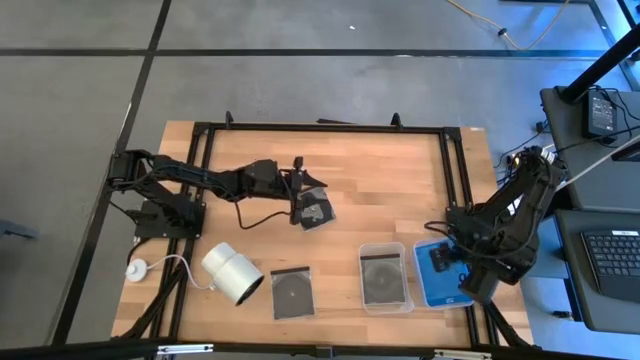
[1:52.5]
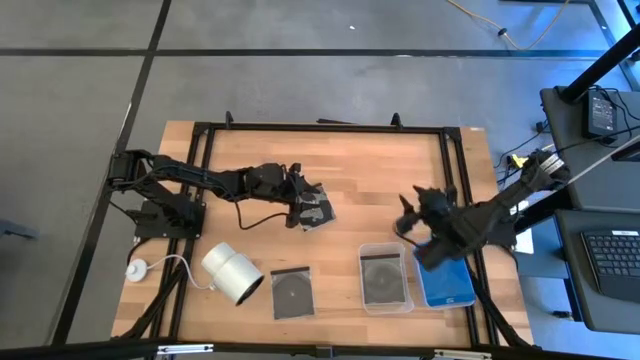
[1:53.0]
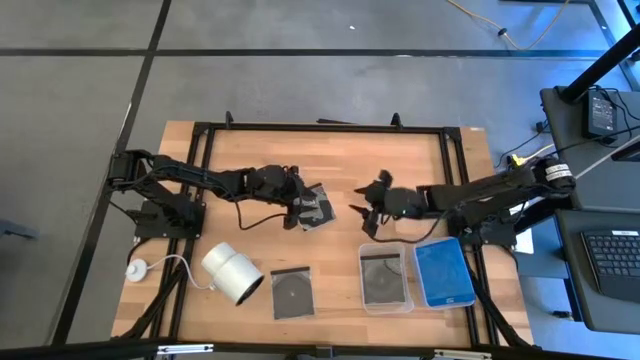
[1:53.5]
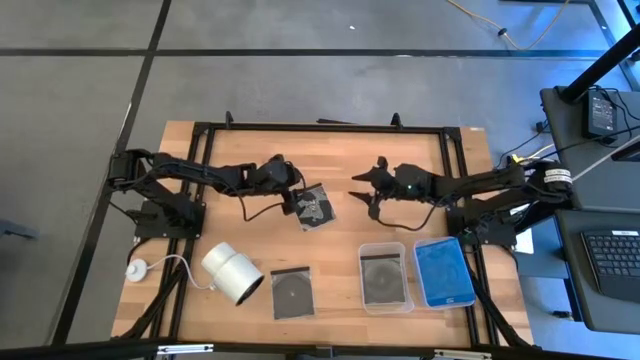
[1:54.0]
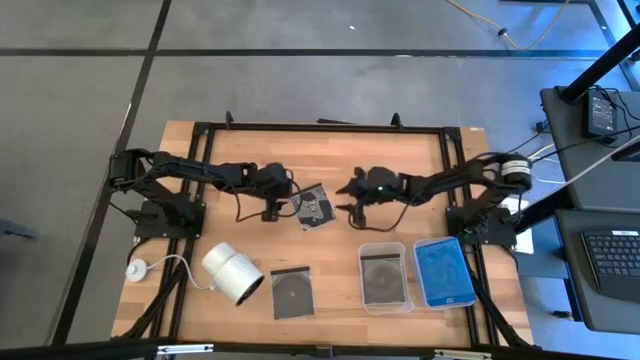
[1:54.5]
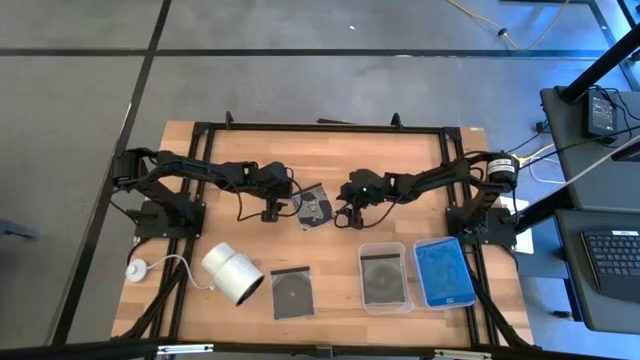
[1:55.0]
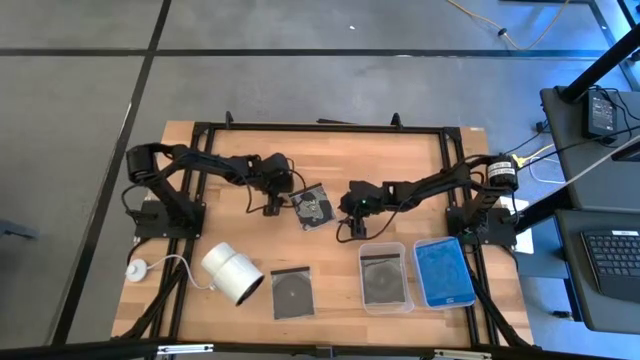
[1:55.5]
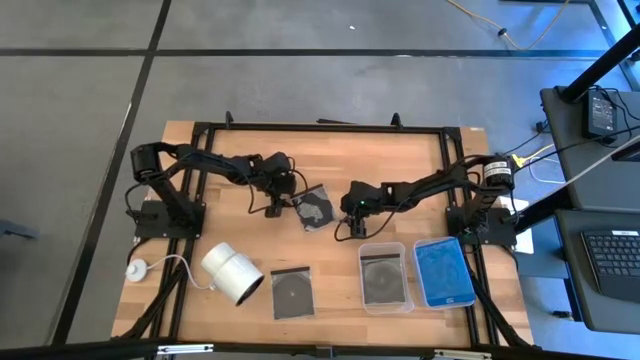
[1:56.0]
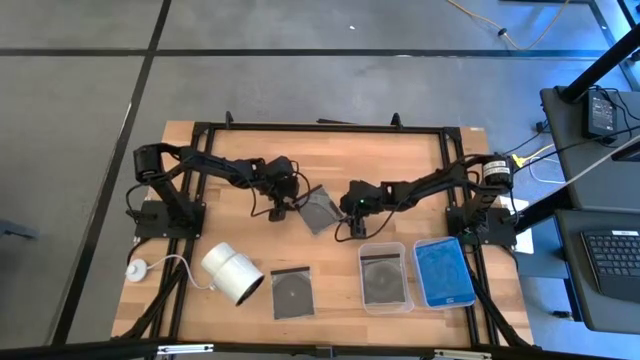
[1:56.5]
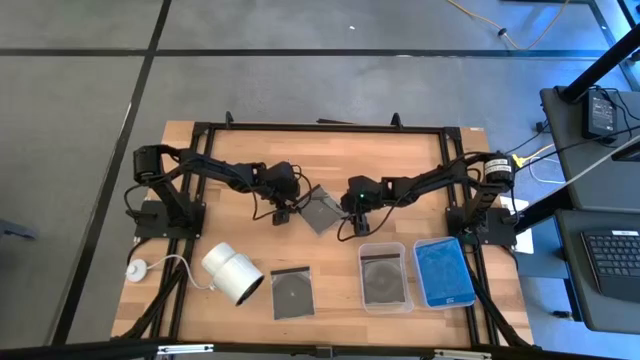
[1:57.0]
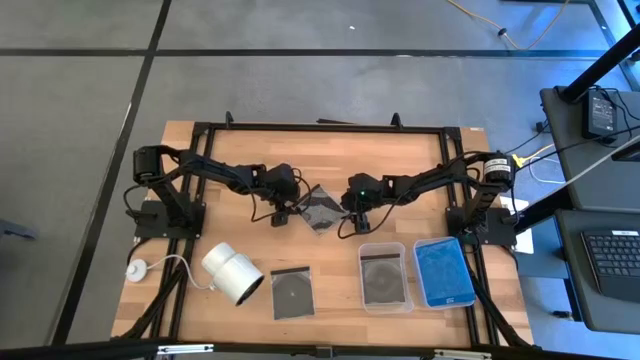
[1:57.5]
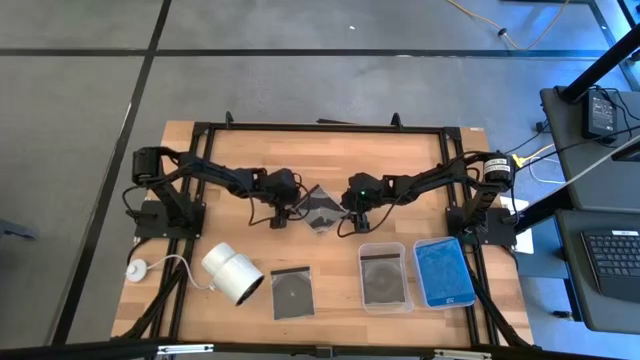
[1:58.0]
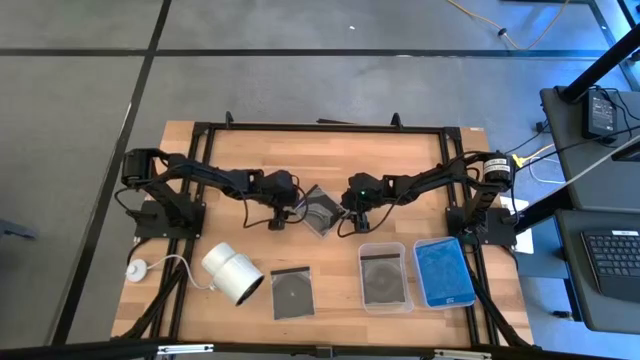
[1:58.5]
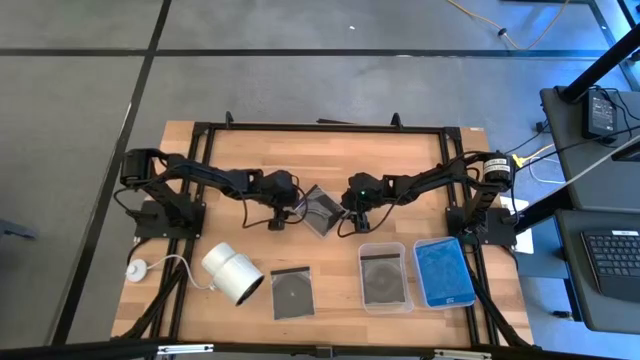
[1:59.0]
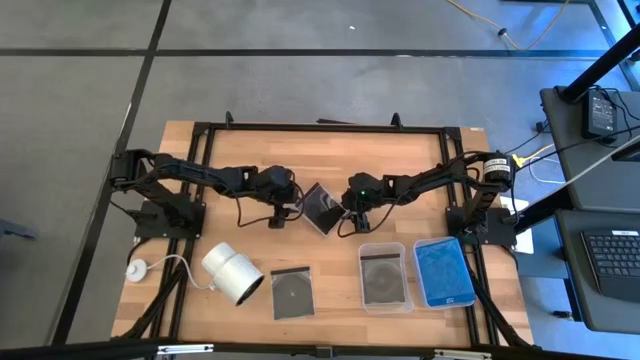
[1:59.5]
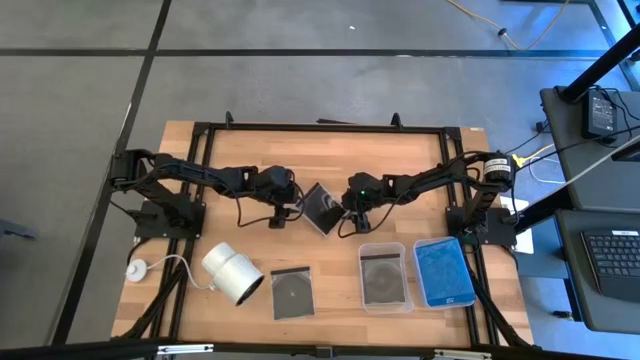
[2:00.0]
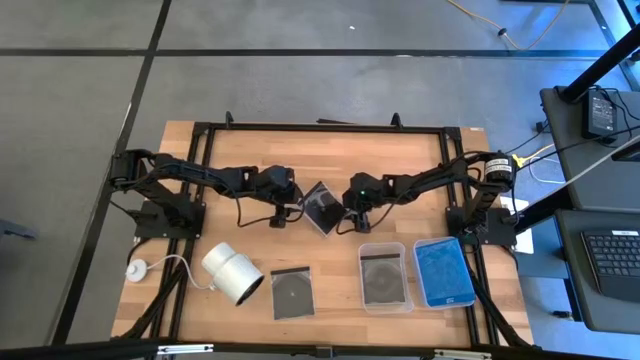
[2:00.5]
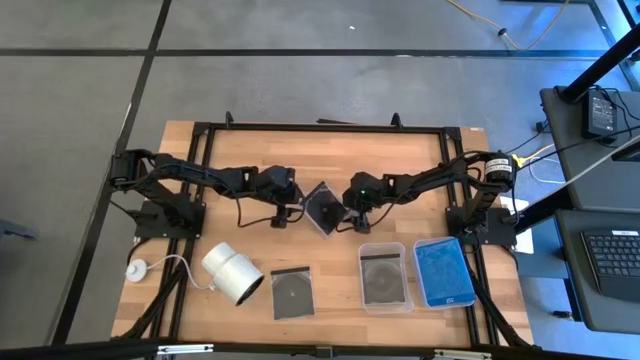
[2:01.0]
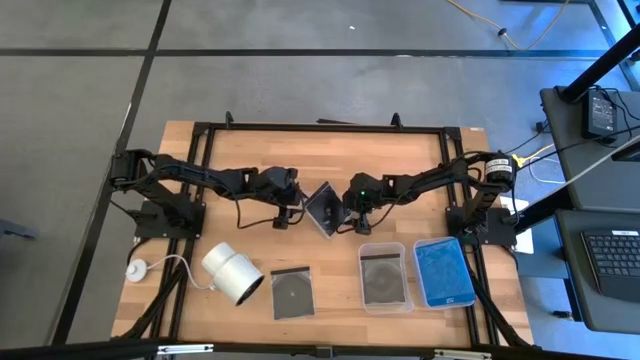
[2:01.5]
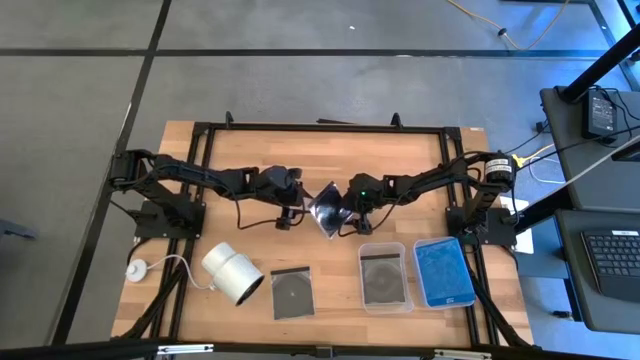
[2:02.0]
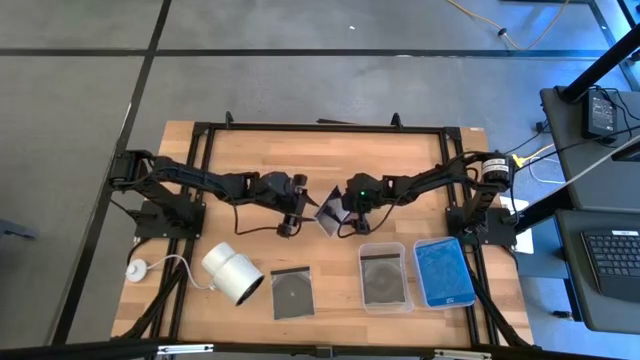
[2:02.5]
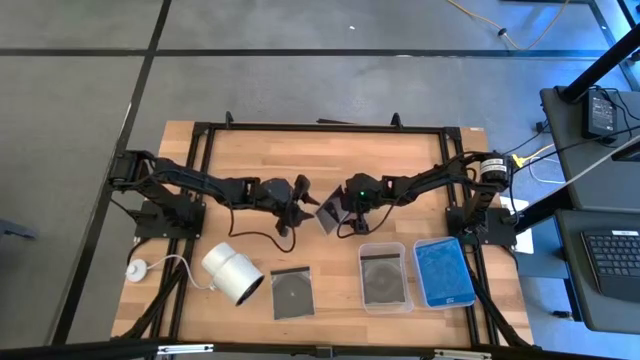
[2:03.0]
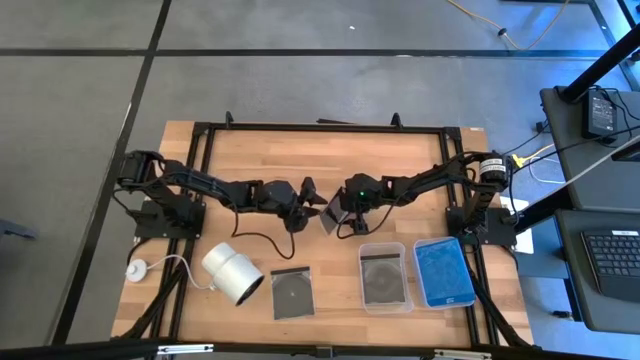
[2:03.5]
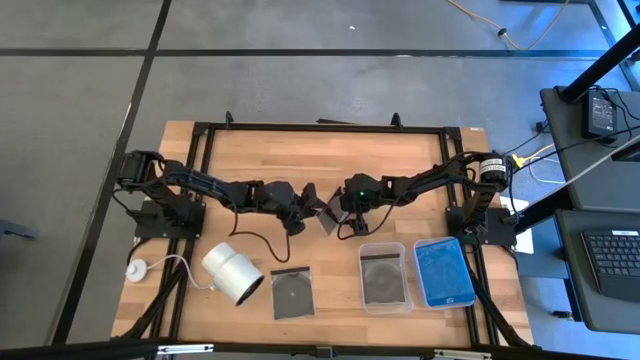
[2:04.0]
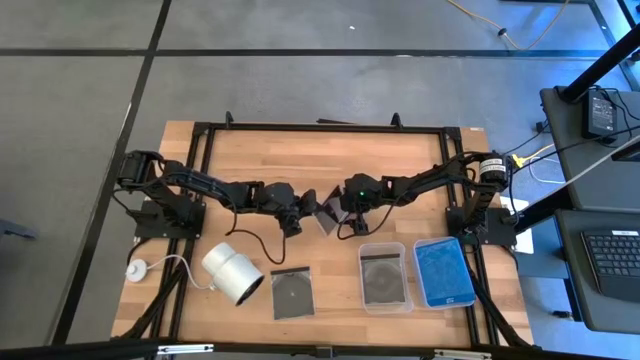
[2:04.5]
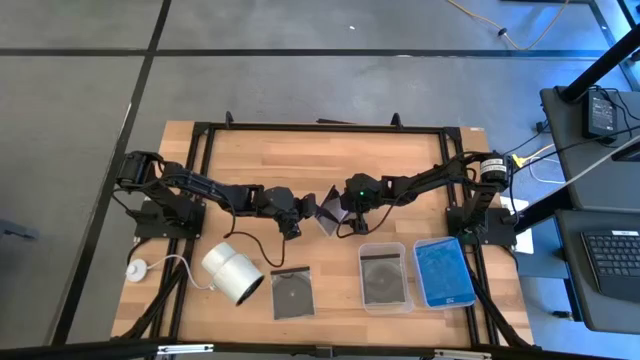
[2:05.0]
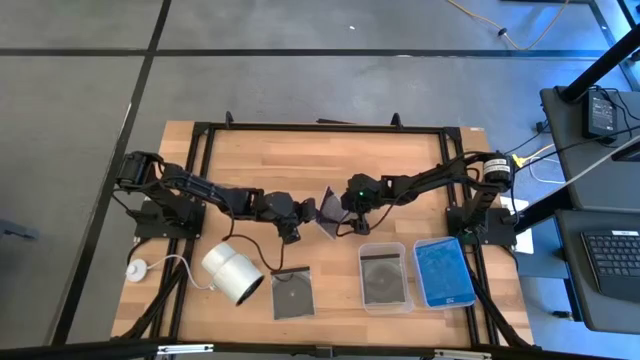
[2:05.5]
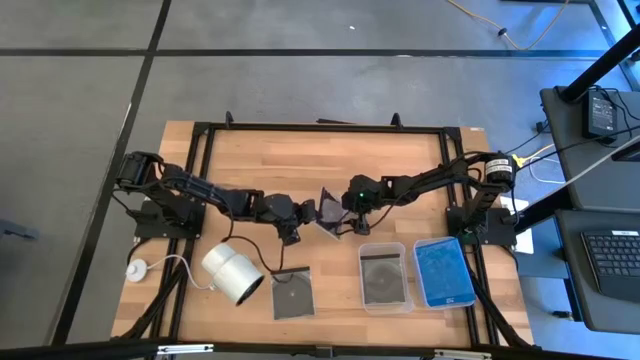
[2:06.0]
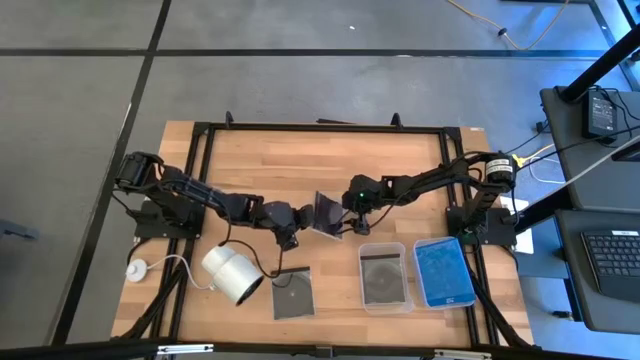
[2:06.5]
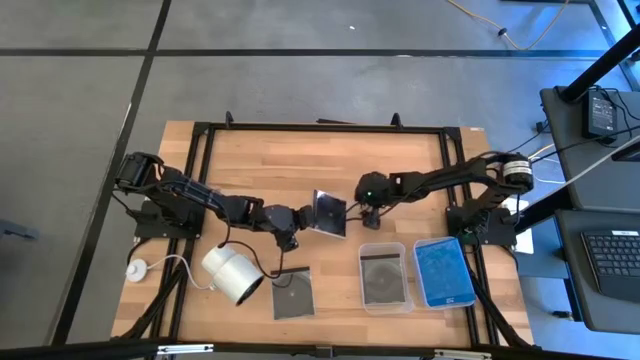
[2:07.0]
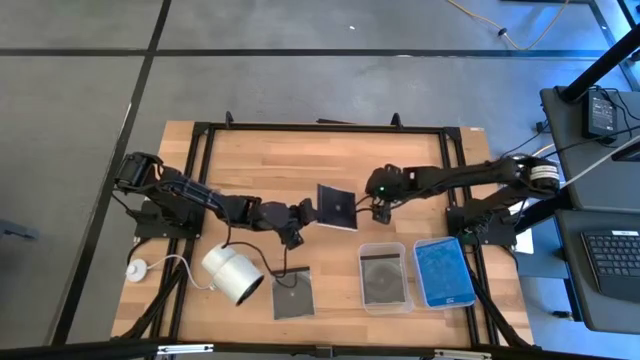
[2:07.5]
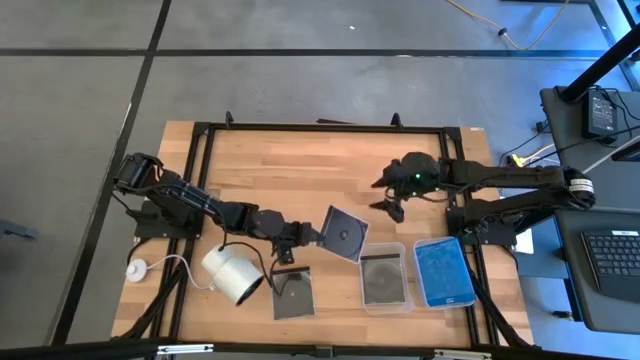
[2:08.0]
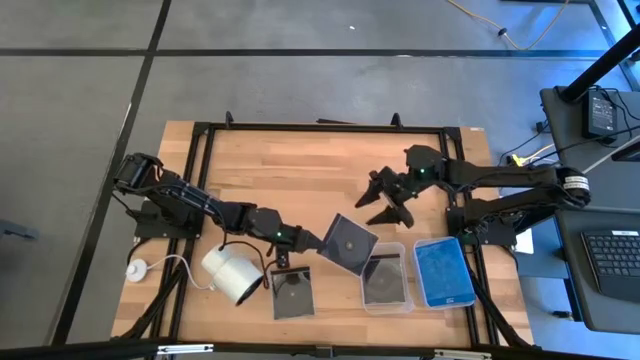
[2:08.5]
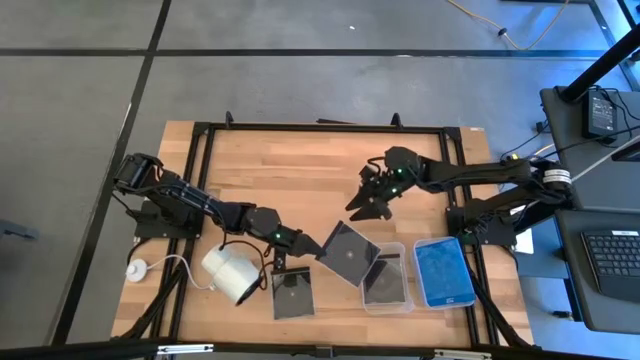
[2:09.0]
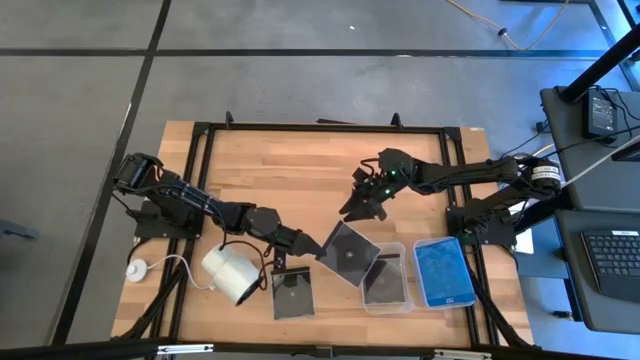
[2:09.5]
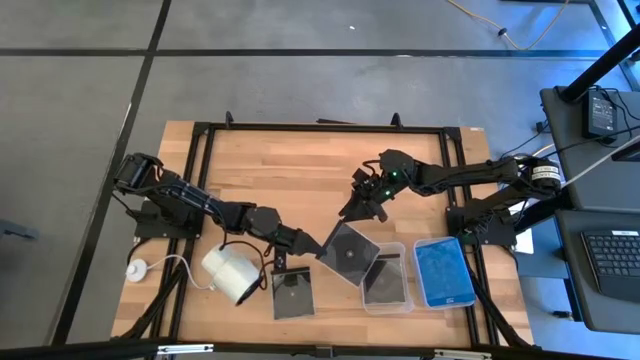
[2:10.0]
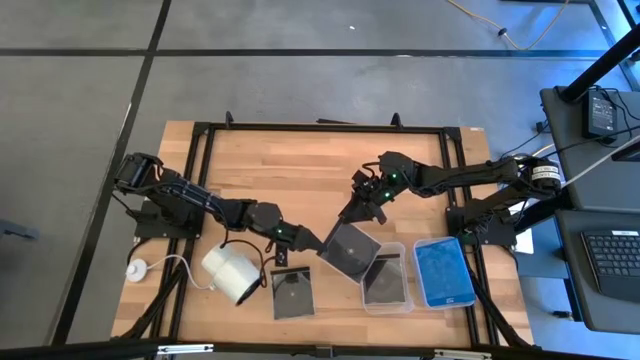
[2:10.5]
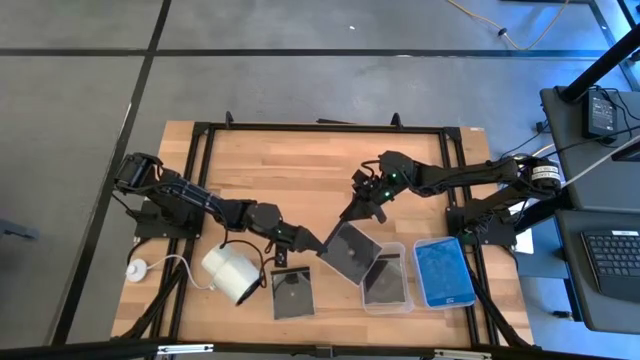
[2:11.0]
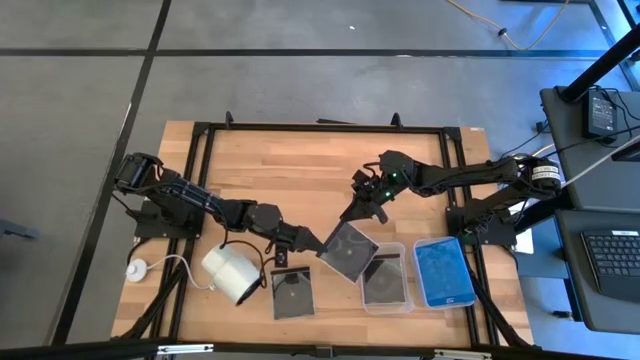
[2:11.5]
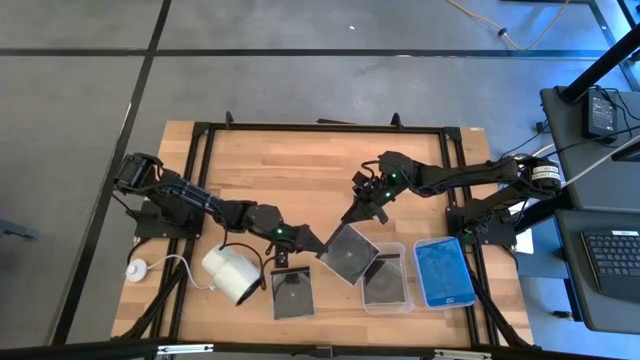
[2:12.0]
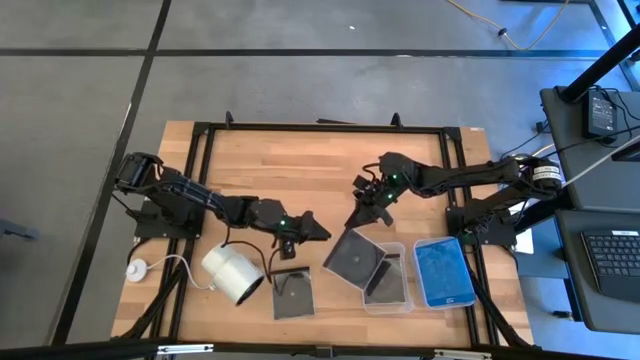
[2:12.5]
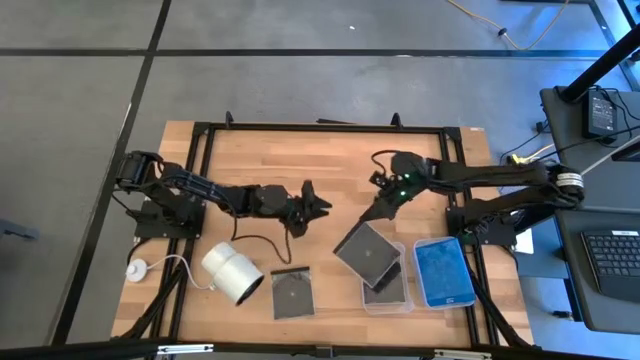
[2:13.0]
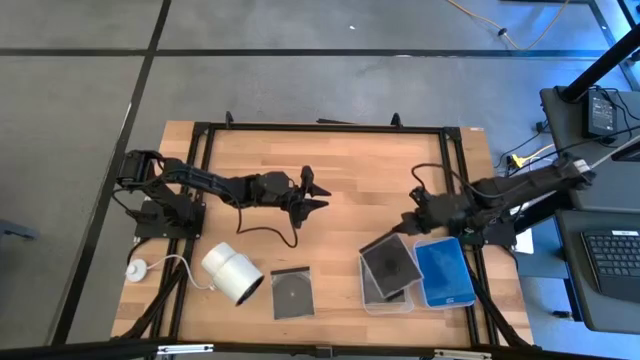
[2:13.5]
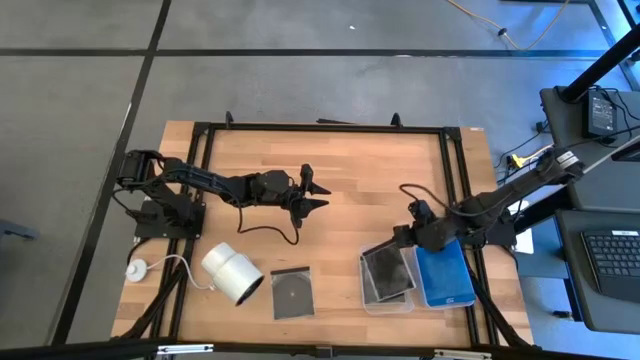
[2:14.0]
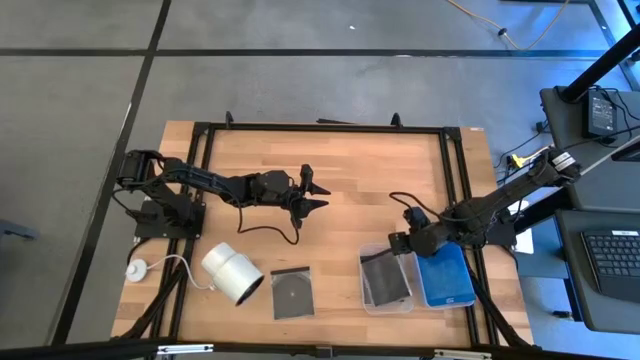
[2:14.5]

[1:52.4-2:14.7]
Task: Pick & place jewel cases by type
Put the top black CD case into the left transparent bin
